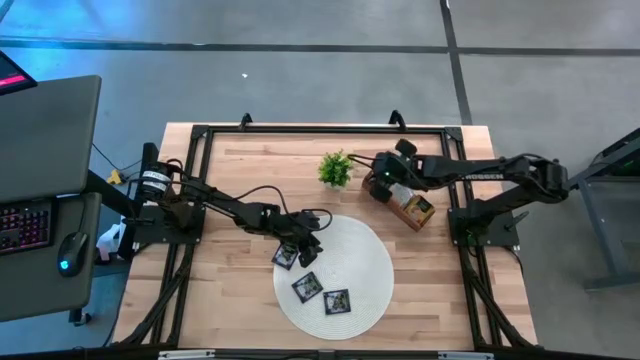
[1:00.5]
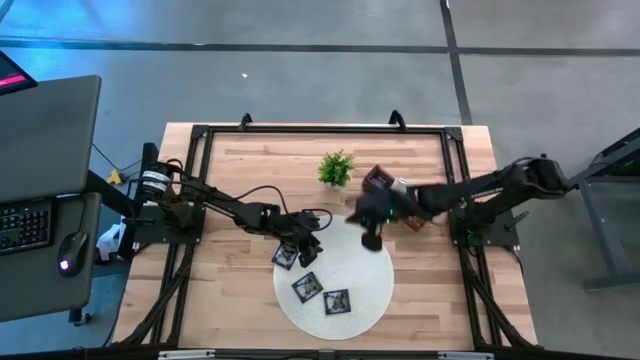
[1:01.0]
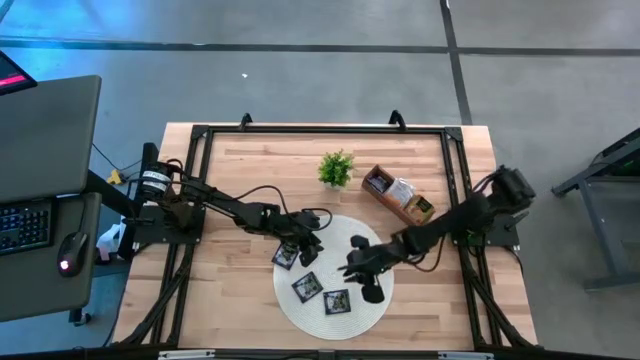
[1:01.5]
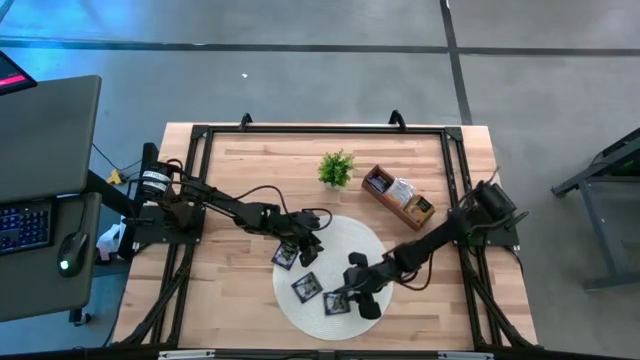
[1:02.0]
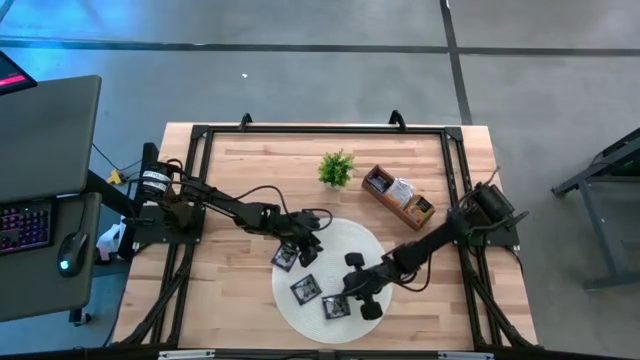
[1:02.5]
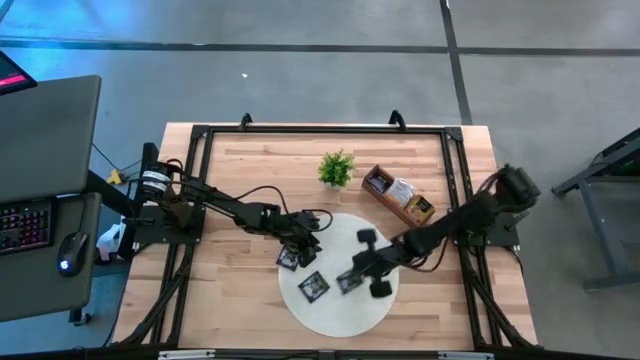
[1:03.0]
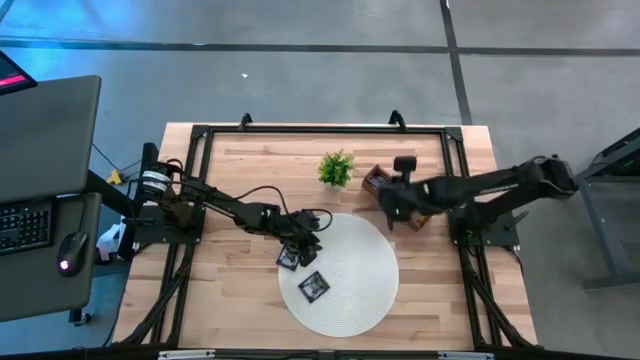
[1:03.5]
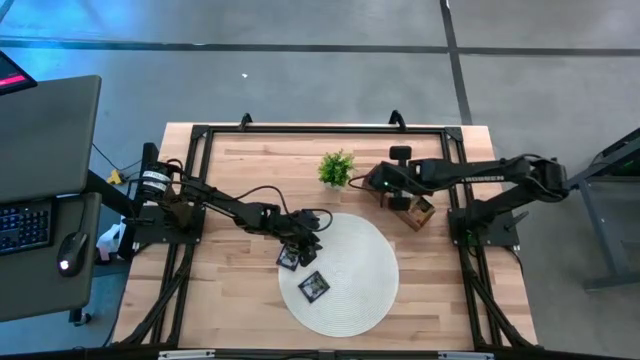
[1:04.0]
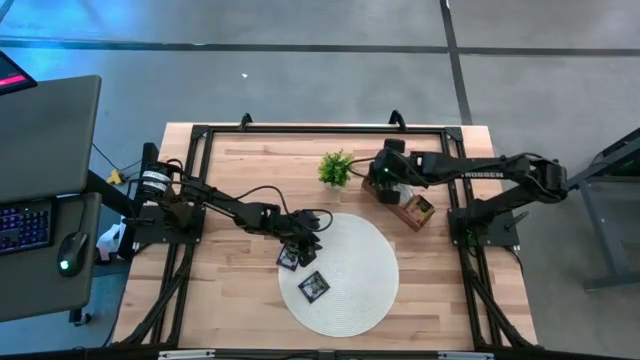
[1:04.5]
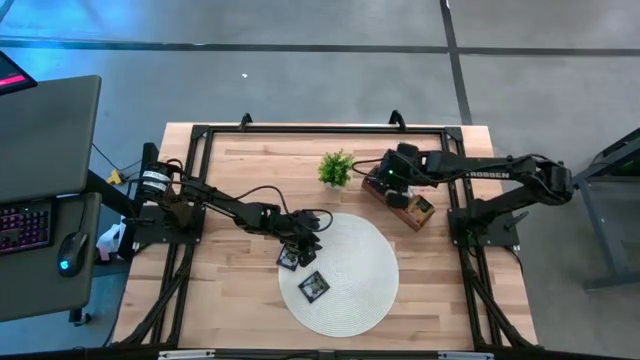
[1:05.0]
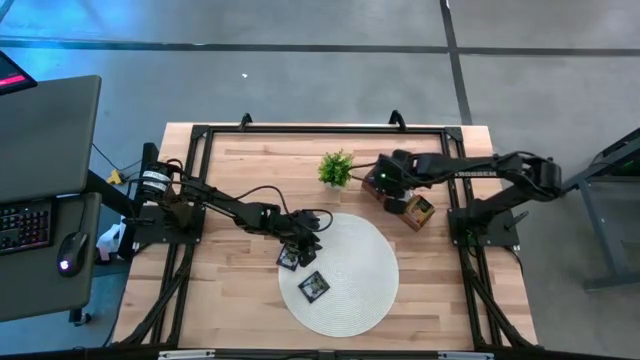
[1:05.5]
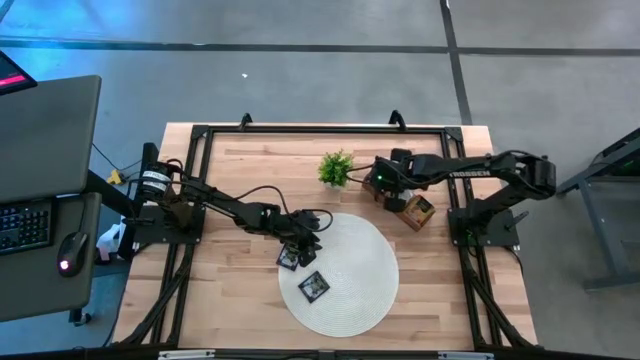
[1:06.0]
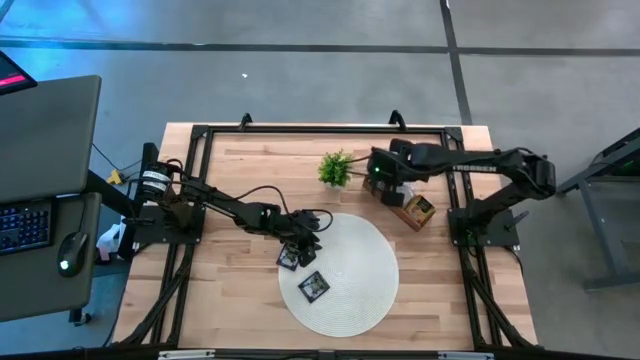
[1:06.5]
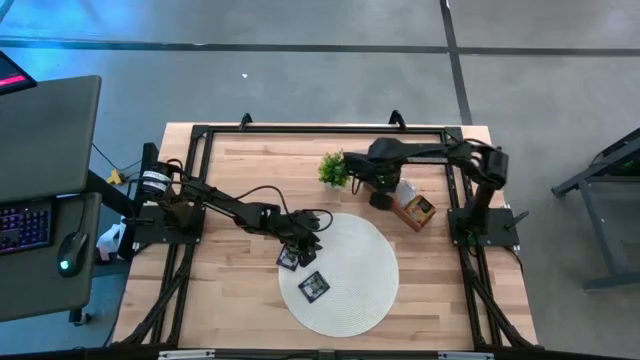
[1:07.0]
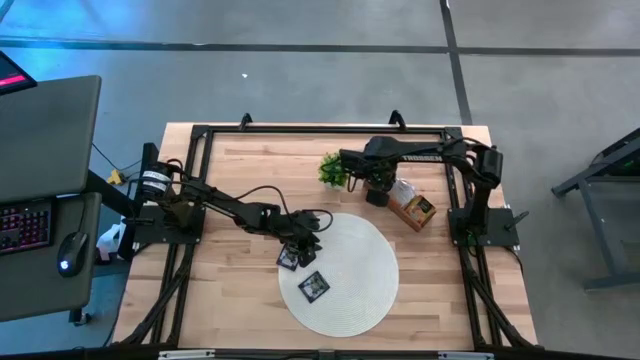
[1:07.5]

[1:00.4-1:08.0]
Task: Pick & Place Tea
Put the black tea bag into the left section of the wooden organizer

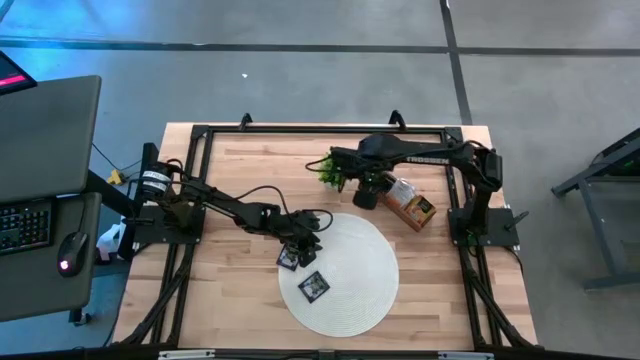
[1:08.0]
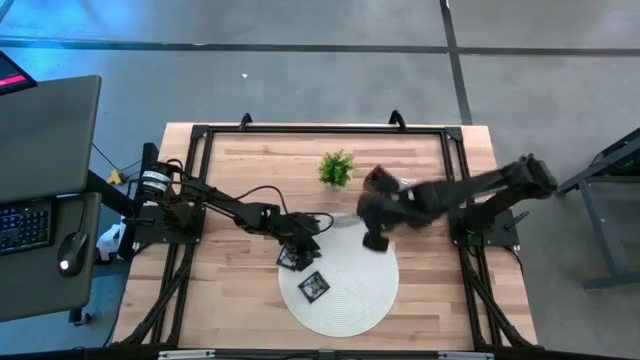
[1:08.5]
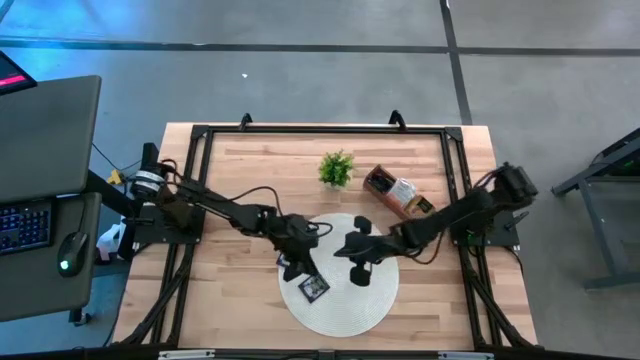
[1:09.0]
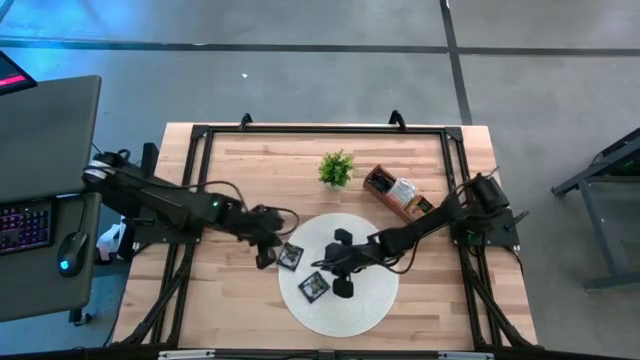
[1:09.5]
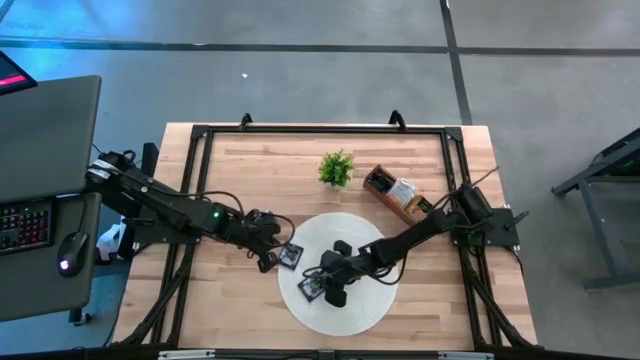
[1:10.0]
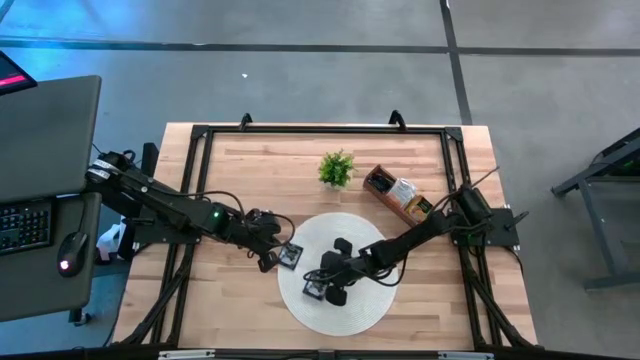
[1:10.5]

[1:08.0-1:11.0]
Put the black tea bag into the left section of the wooden organizer

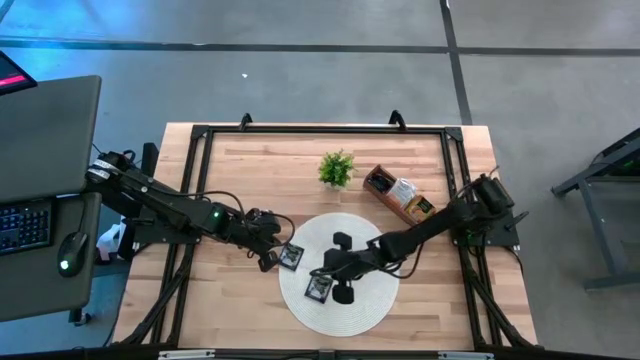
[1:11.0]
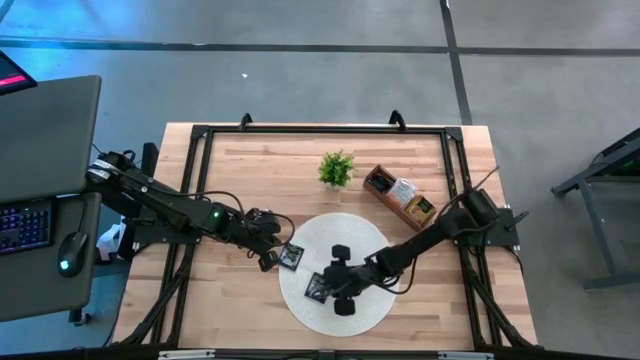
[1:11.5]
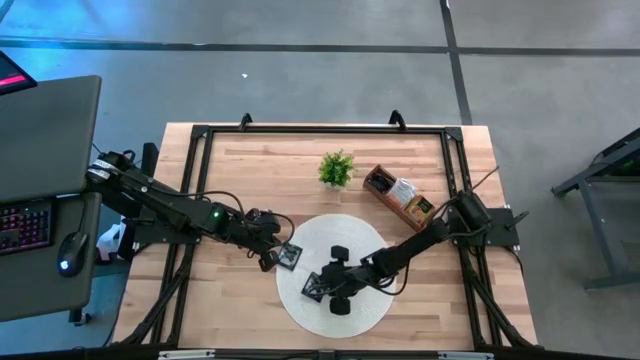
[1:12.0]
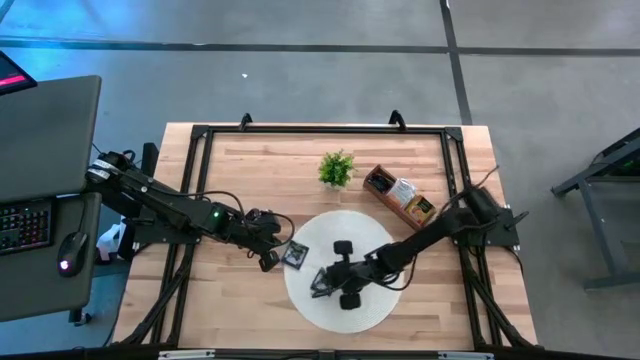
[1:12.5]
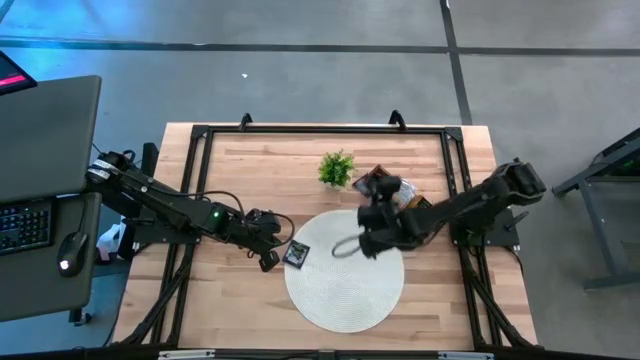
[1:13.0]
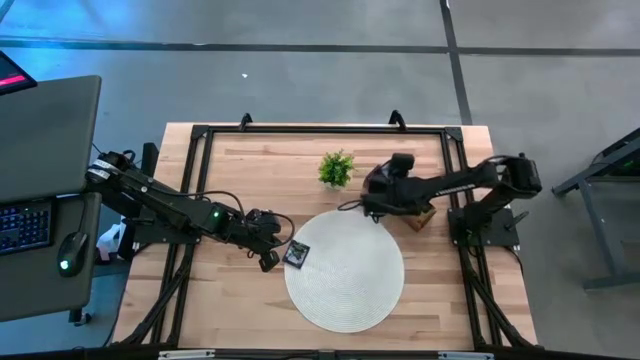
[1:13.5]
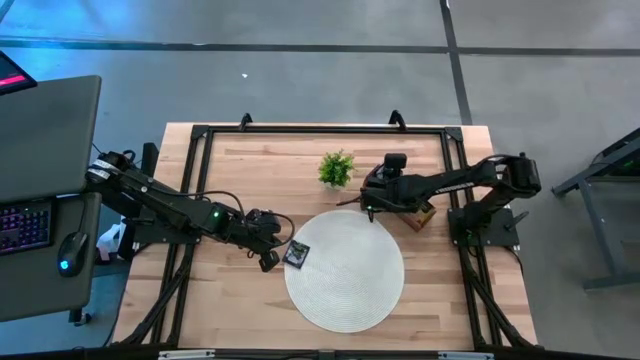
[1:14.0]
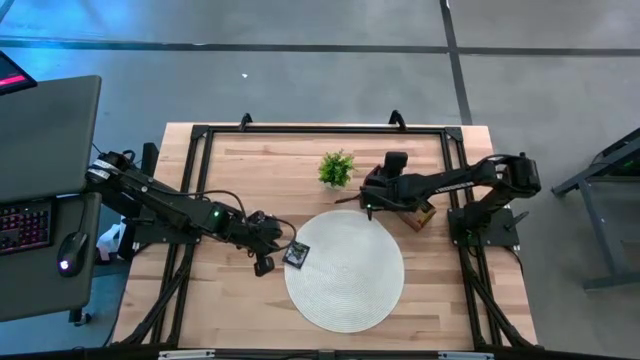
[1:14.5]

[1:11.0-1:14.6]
Put the black tea bag into the left section of the wooden organizer

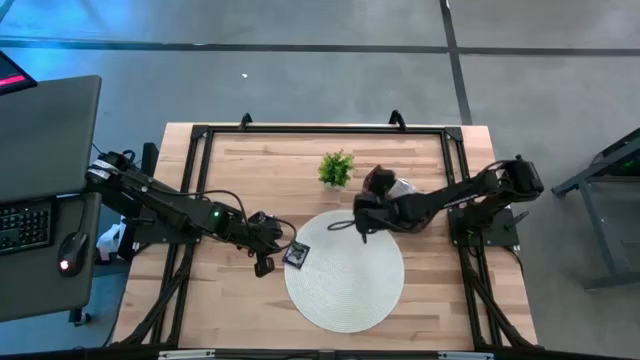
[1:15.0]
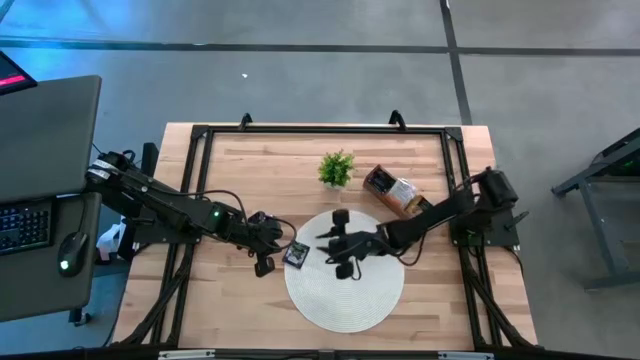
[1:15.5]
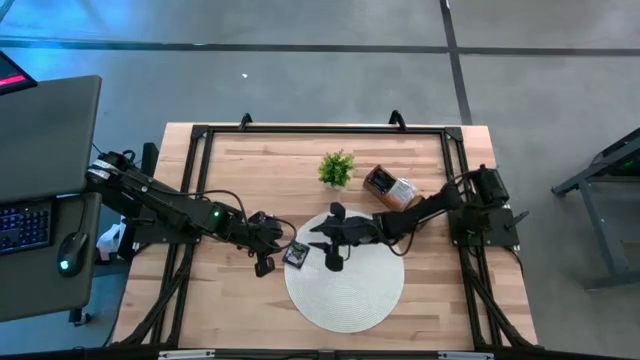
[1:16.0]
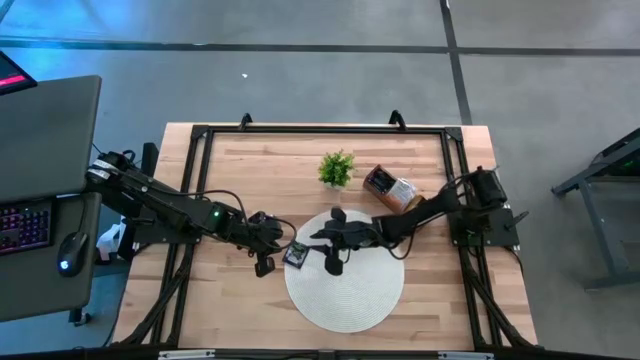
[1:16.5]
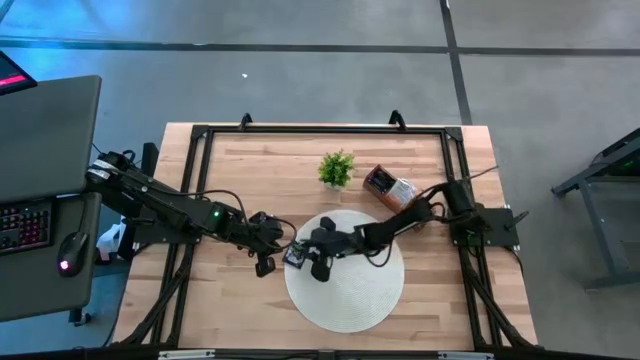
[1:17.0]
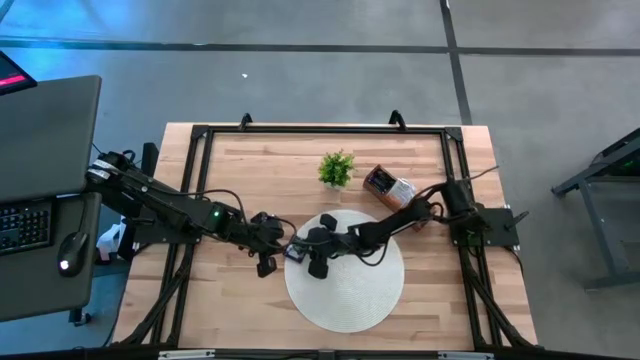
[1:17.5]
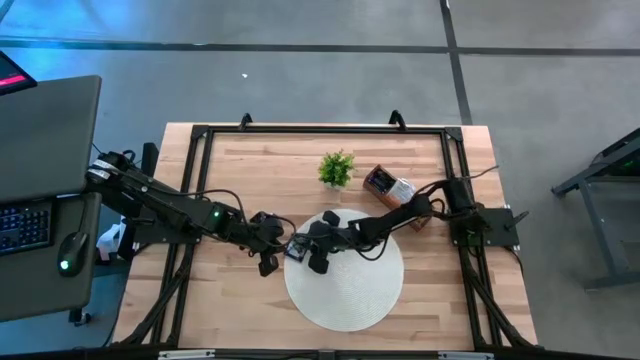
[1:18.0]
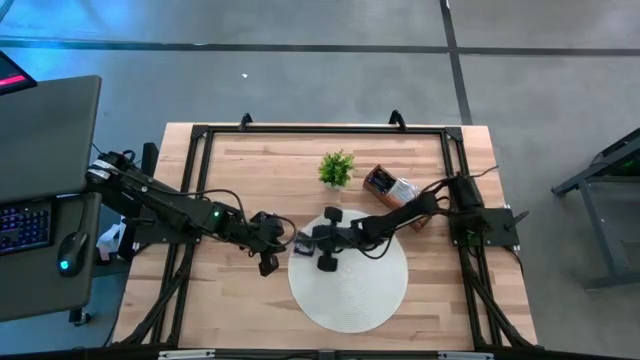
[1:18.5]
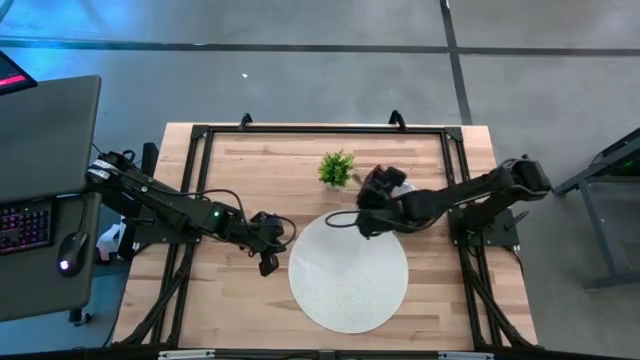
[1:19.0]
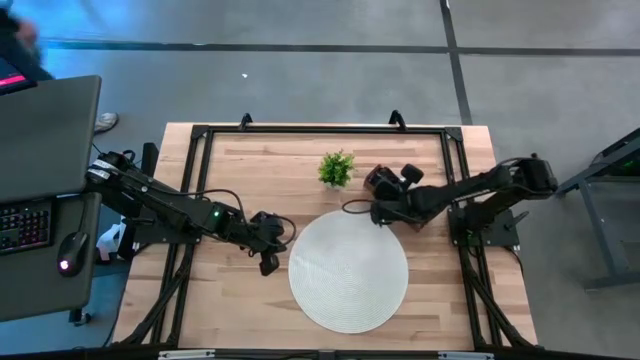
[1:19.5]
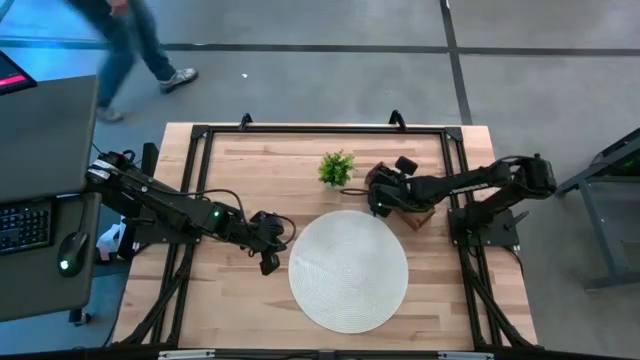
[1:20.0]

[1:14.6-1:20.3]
Put the black tea bag into the left section of the wooden organizer

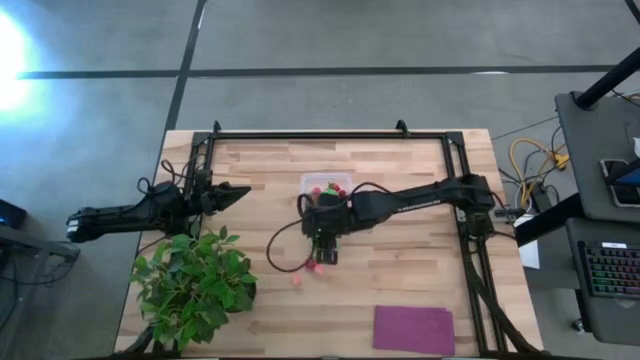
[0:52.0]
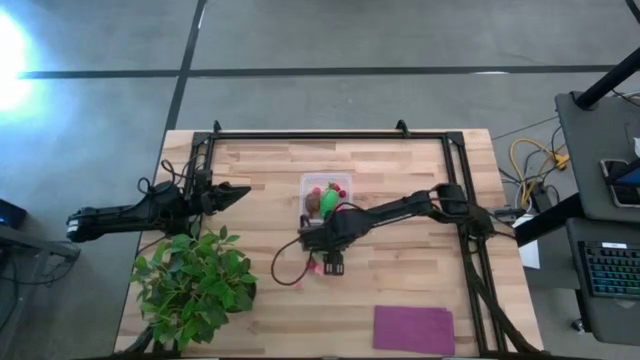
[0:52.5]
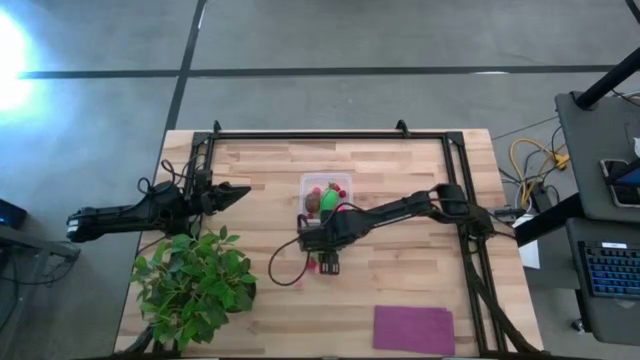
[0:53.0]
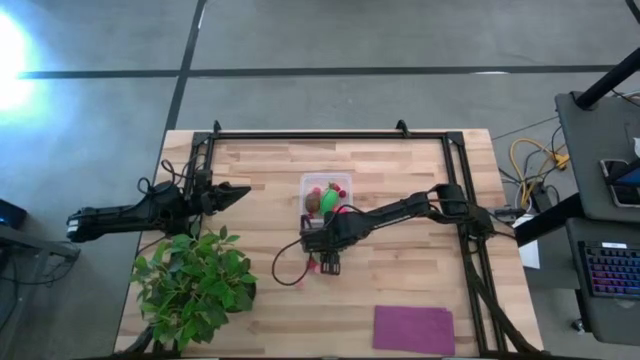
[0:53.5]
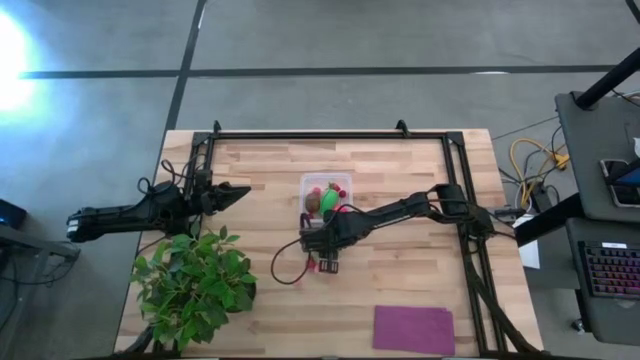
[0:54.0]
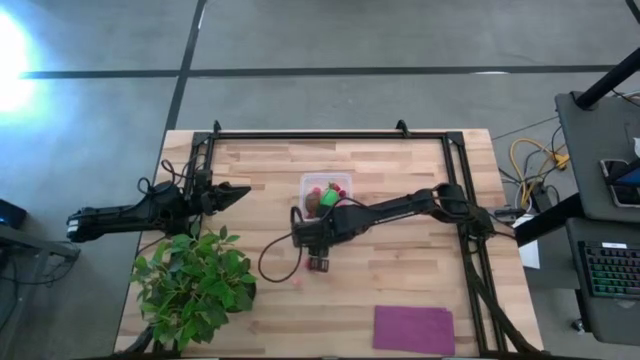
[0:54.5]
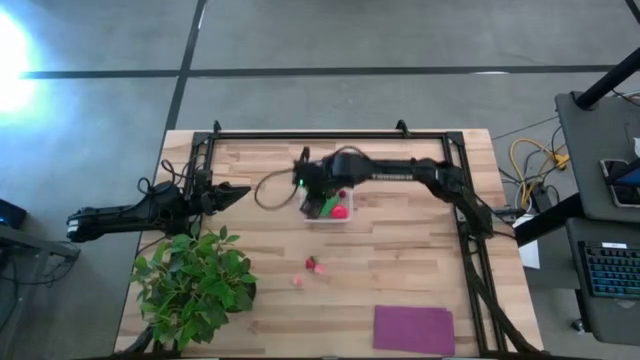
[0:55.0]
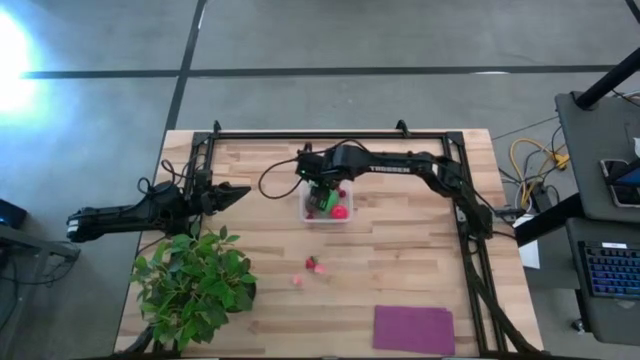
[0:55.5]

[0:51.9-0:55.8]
Task: Pick and placing Produce into tupperware
Put the green peas into the transparent bin
